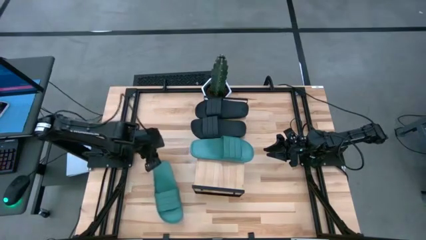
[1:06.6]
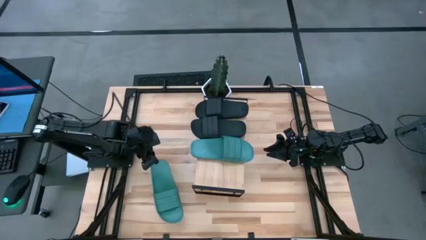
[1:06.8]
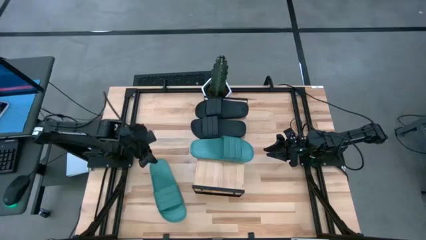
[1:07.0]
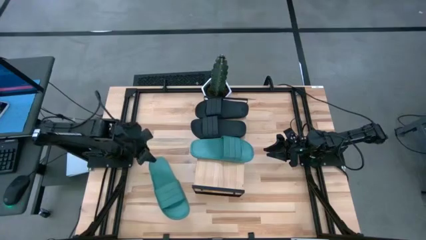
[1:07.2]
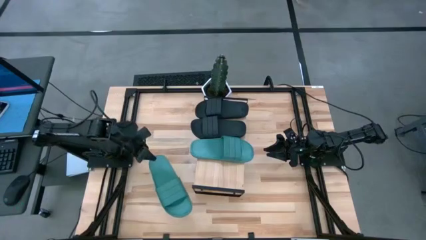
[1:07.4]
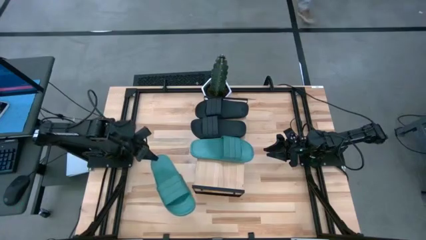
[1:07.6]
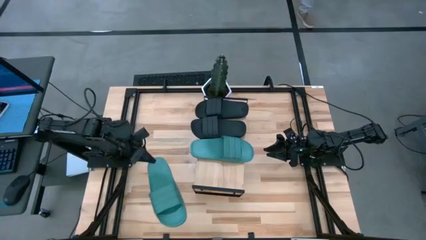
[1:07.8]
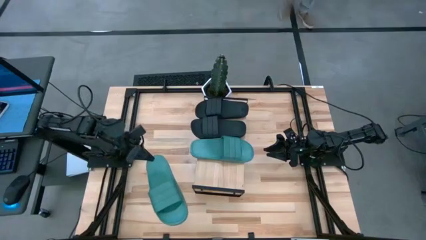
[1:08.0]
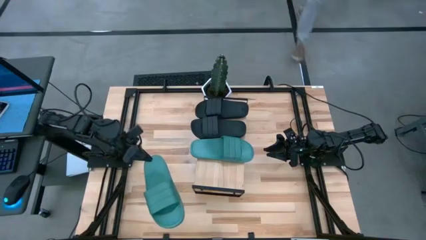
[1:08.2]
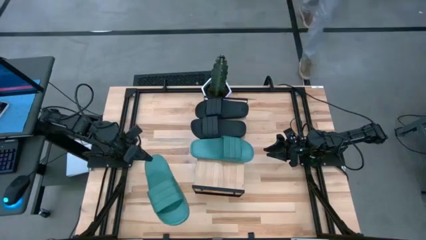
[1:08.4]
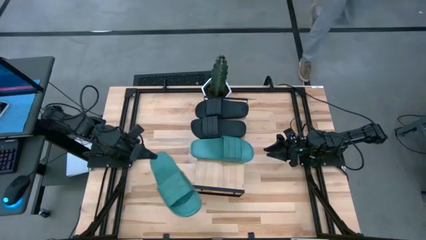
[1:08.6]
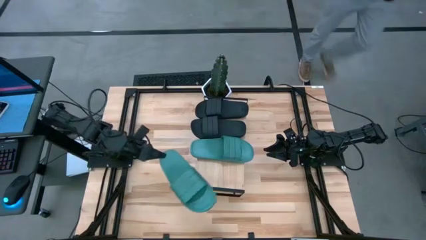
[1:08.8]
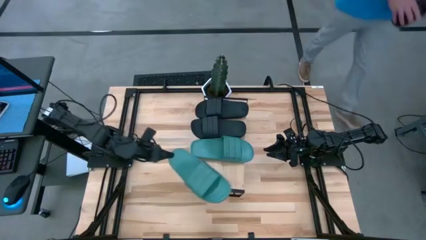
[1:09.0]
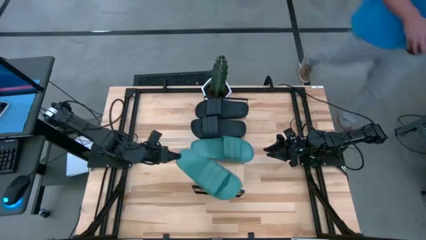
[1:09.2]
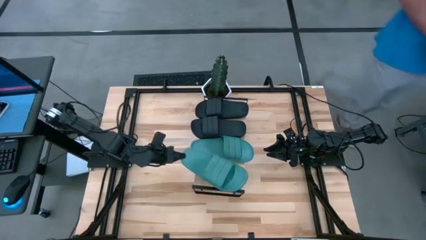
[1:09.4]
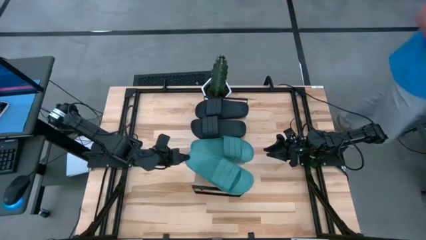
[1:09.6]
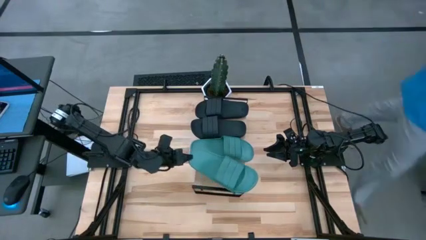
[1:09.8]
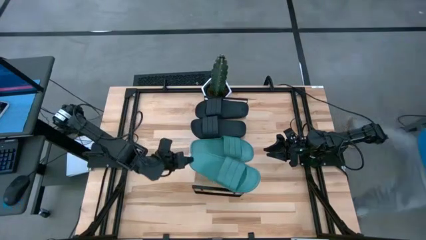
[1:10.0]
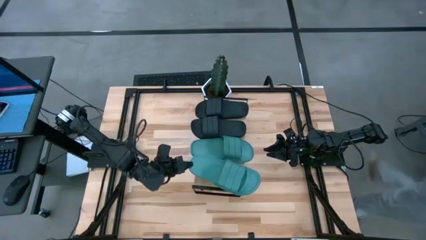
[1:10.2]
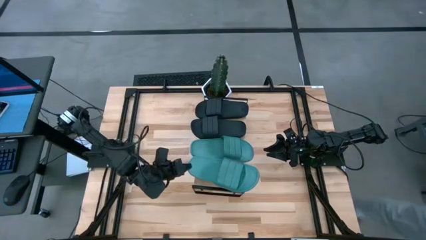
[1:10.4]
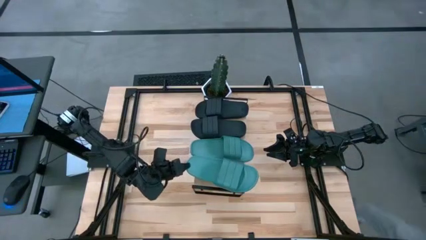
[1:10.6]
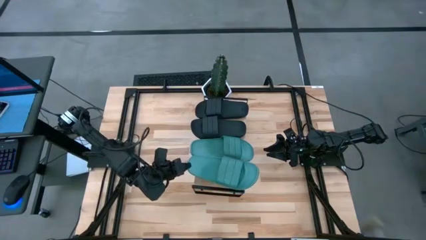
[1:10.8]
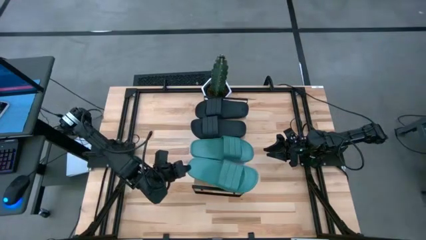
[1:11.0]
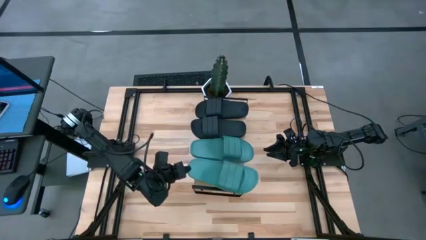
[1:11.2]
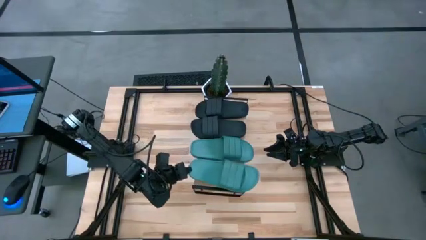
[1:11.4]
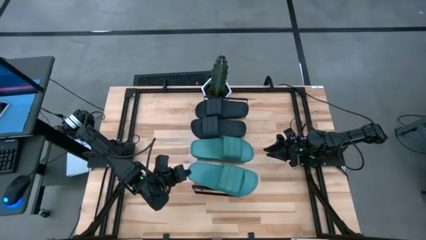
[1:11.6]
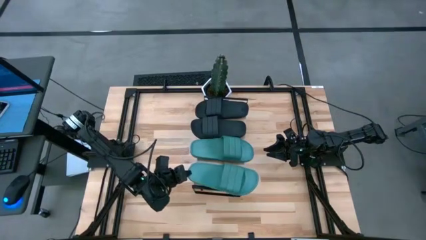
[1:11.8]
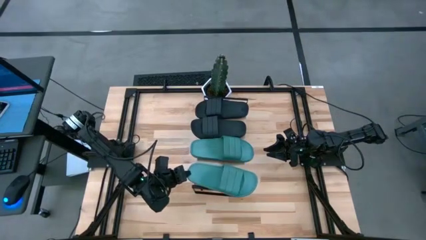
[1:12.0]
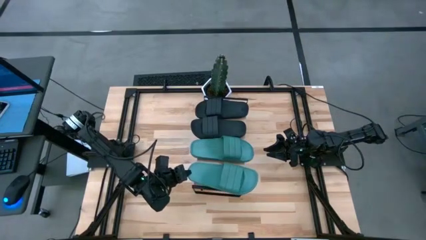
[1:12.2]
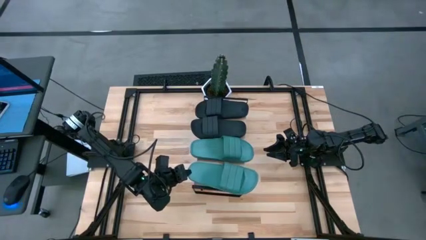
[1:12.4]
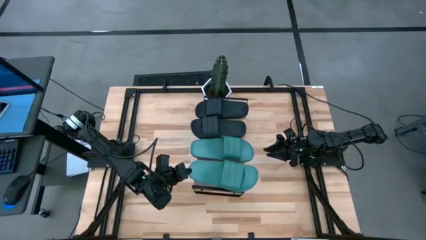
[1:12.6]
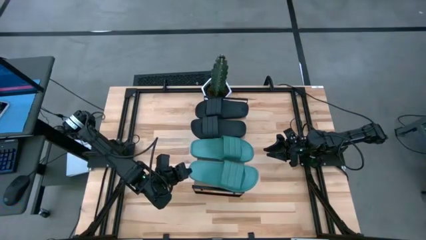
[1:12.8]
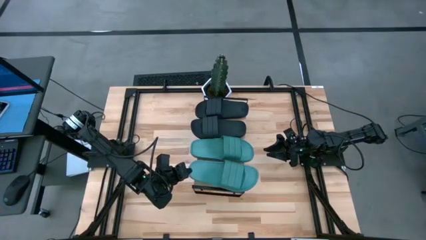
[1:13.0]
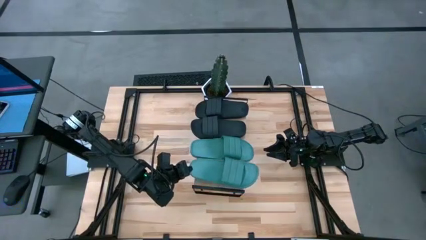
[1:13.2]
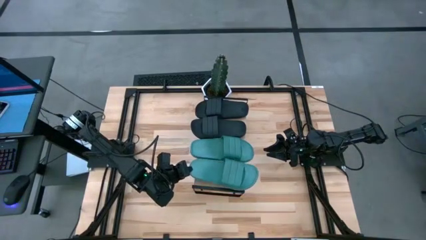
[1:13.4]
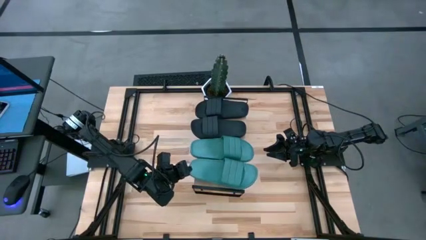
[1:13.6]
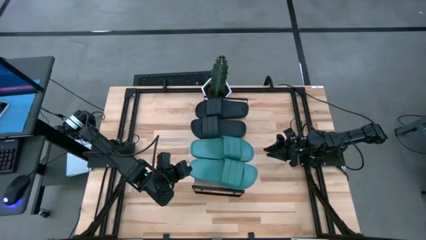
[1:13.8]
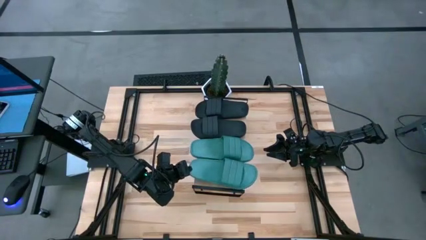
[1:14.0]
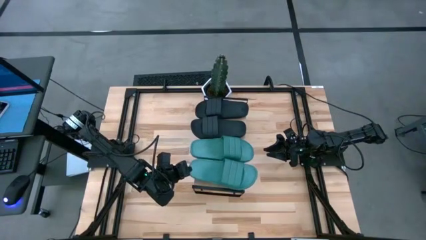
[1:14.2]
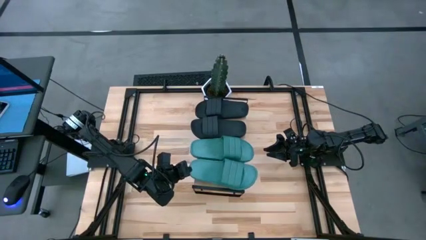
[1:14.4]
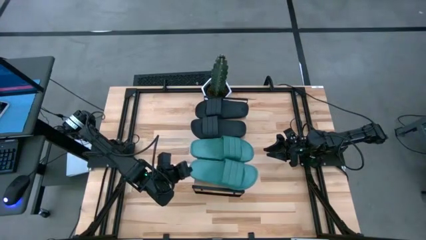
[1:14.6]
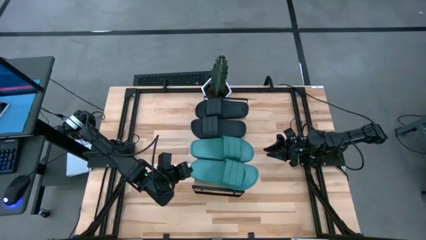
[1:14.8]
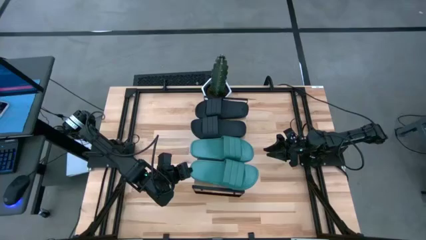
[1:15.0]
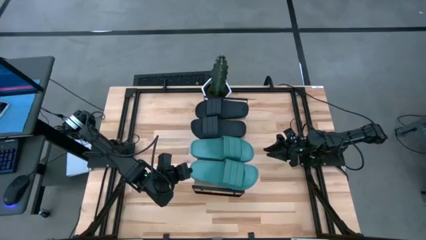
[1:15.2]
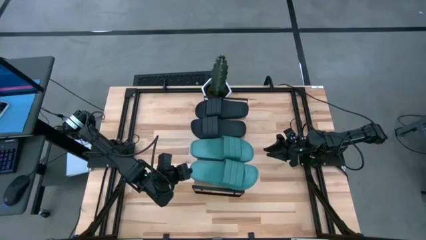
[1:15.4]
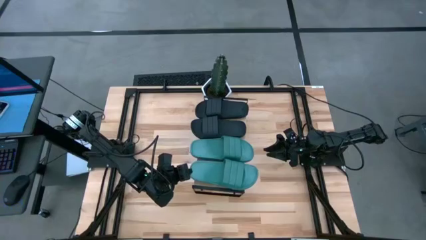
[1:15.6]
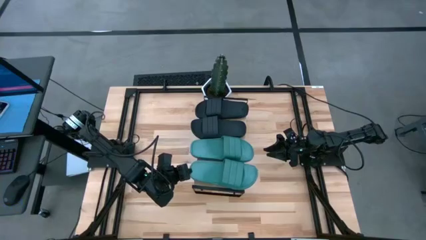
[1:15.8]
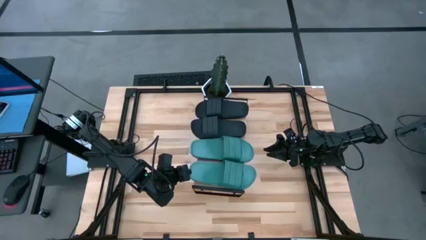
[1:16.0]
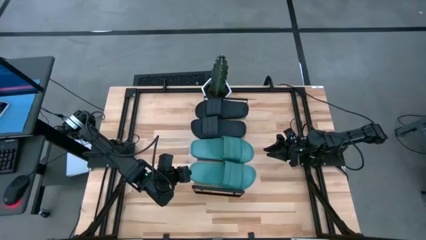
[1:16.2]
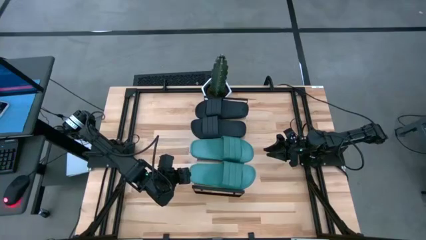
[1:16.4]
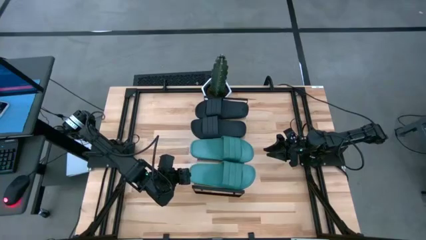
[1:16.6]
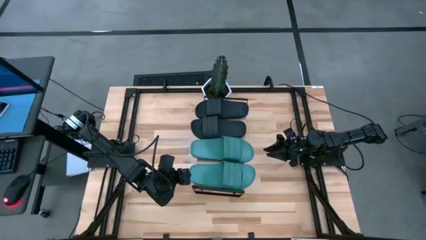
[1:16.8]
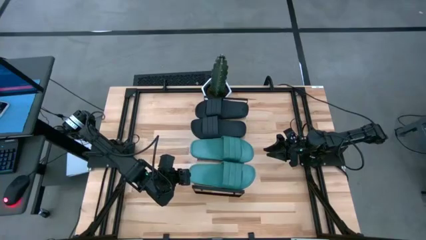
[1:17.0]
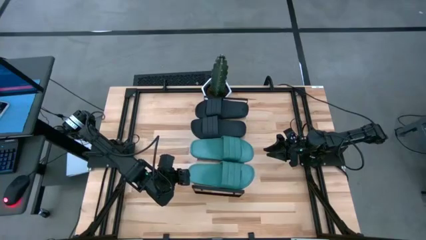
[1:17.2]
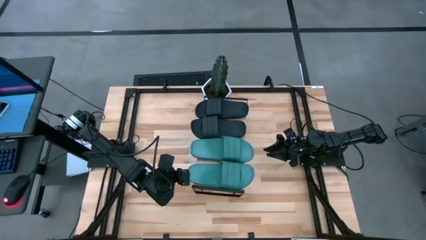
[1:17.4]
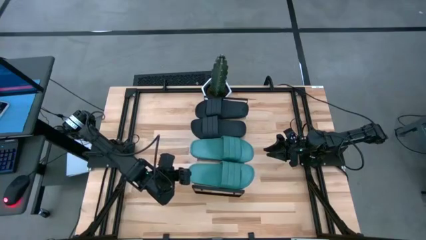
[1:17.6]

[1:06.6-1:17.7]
Task: Pick and place slides into the shelf
Put the green slipper on the shelf

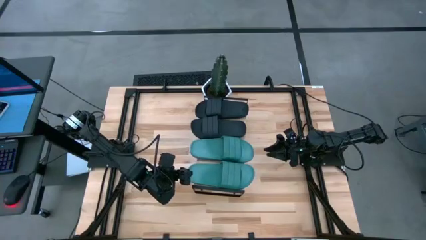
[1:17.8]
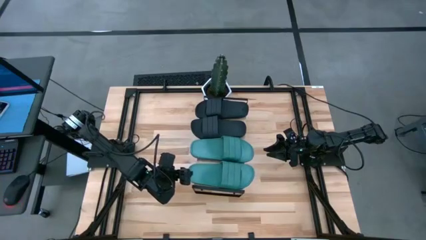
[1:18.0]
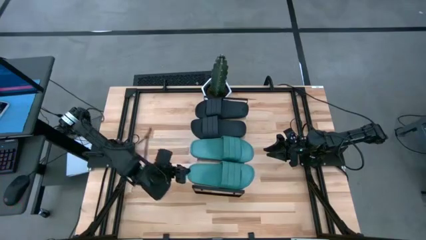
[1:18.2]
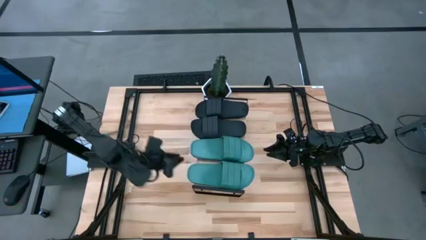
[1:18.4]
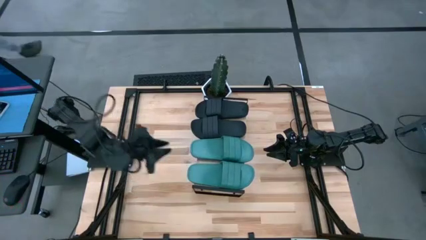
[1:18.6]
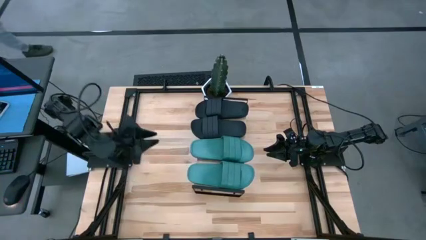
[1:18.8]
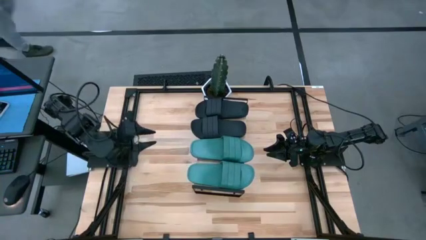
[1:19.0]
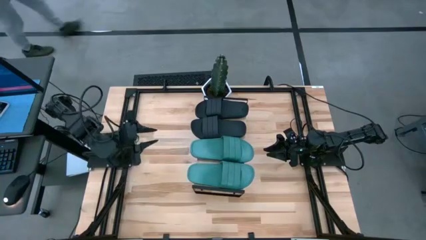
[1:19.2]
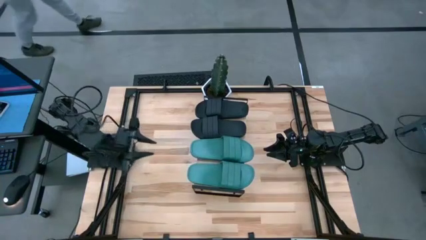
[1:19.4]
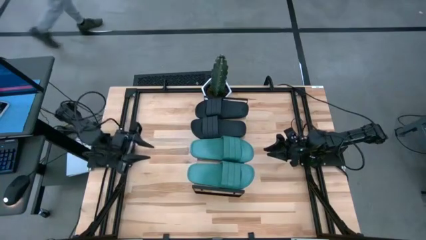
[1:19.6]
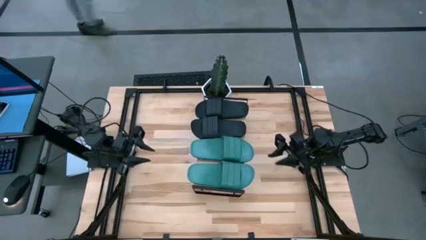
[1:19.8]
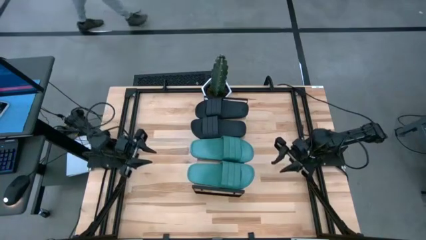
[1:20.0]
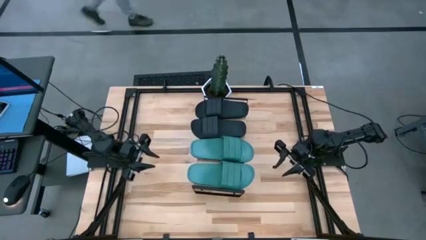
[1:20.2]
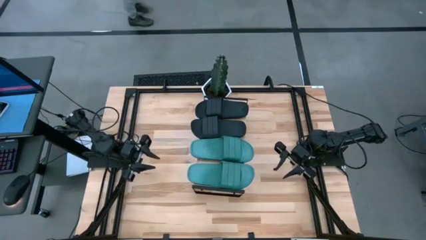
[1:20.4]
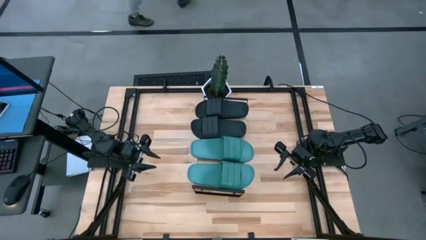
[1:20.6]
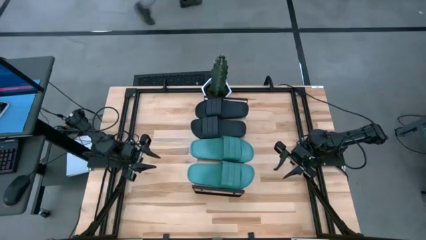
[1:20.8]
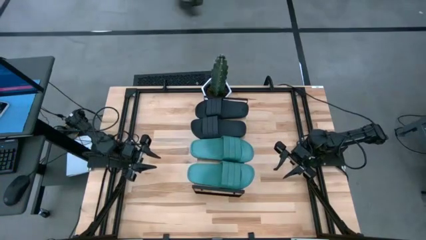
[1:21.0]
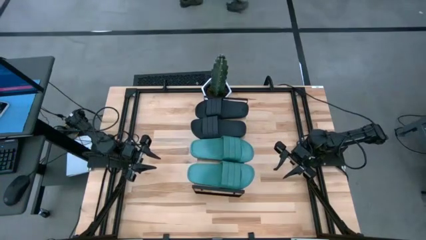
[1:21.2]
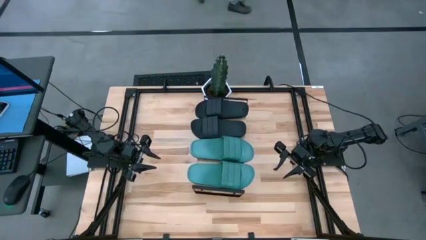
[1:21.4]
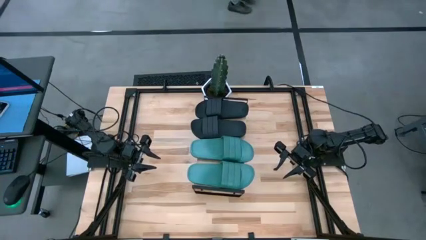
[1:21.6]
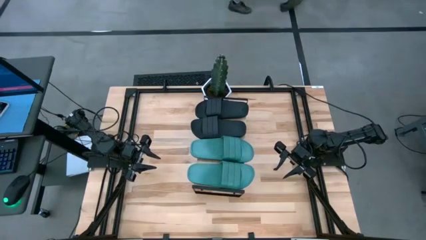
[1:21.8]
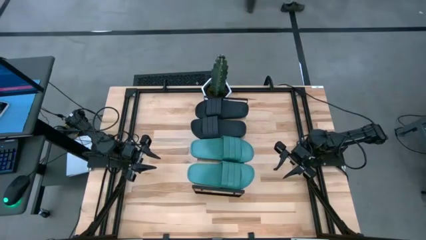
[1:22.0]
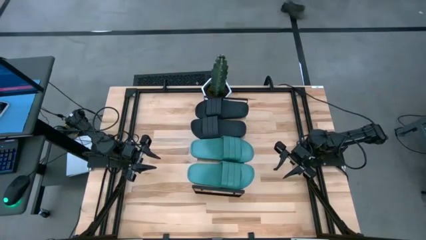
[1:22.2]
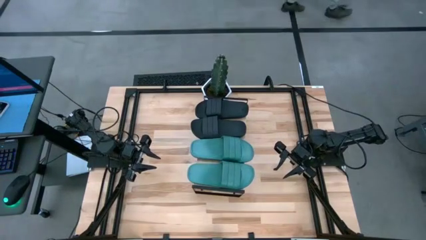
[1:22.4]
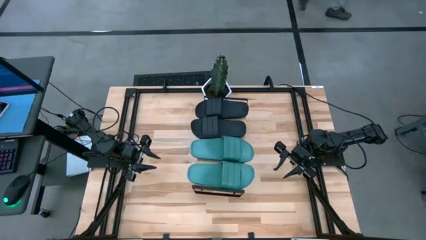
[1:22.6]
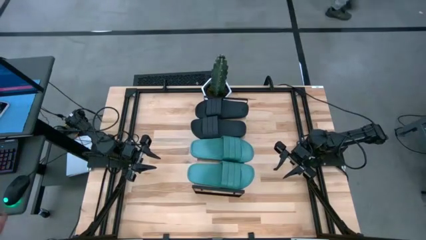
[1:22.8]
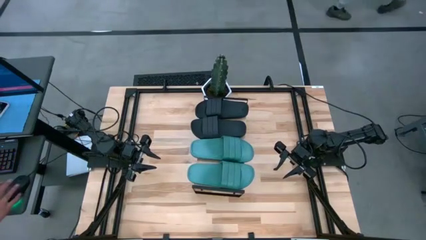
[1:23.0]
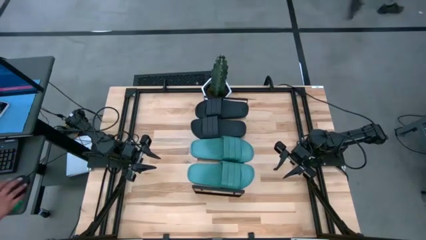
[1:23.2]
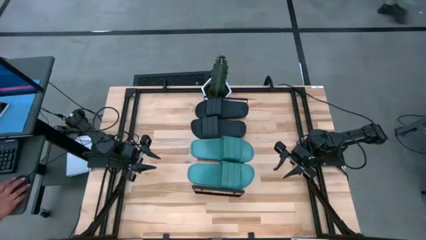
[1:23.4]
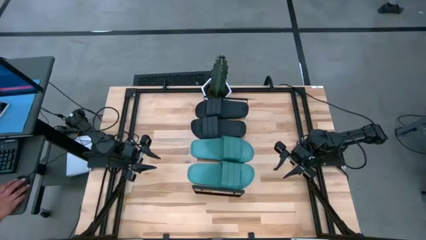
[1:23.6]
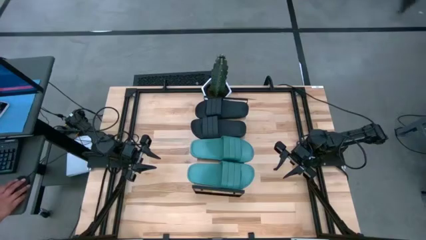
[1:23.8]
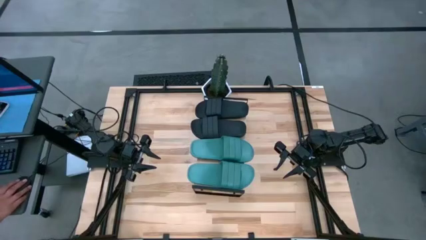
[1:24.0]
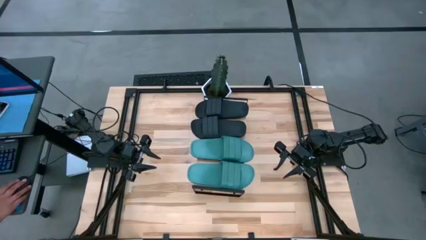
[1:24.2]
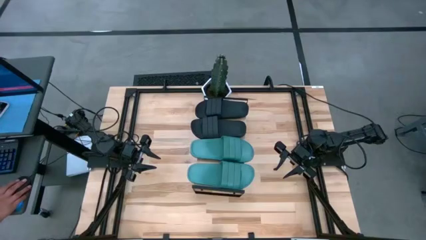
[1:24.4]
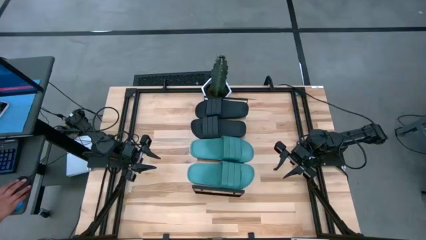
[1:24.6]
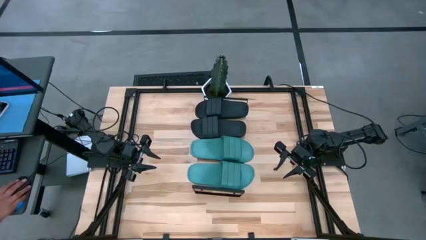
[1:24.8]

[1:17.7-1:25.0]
Return to Home Position
